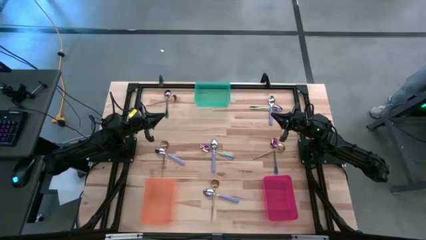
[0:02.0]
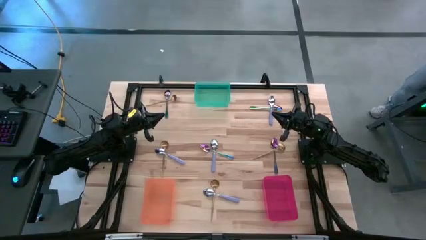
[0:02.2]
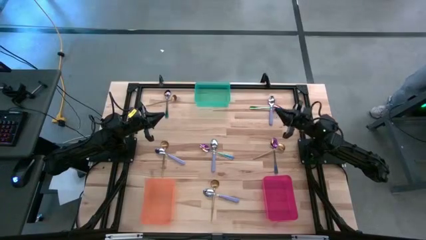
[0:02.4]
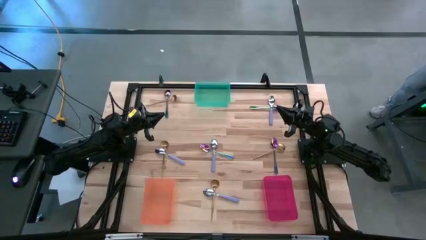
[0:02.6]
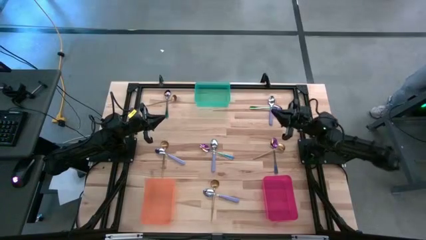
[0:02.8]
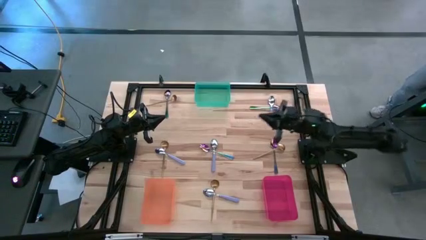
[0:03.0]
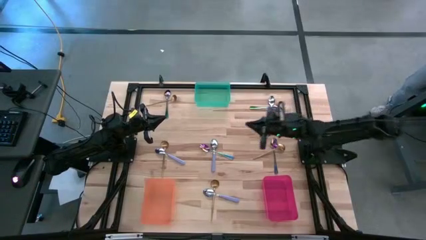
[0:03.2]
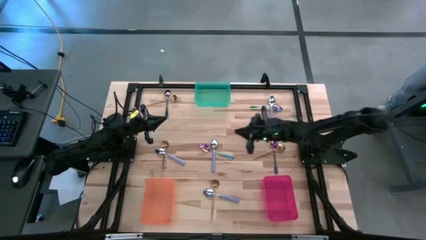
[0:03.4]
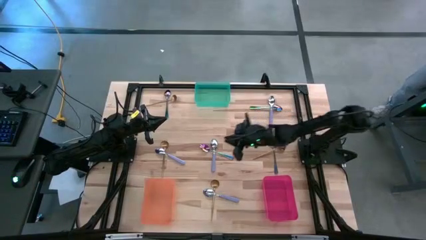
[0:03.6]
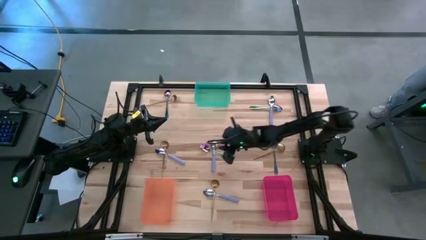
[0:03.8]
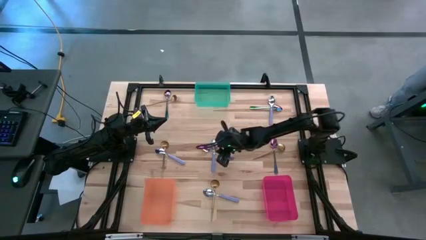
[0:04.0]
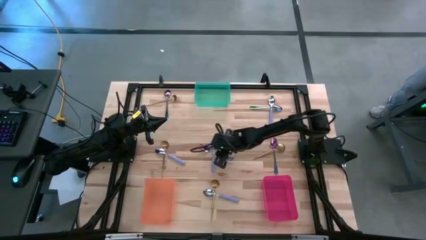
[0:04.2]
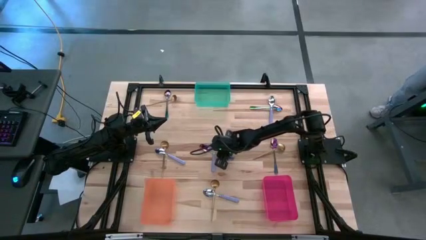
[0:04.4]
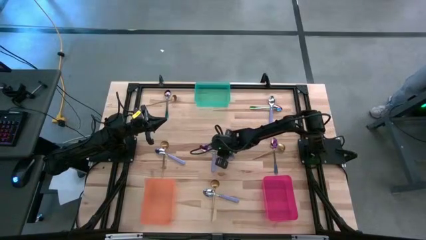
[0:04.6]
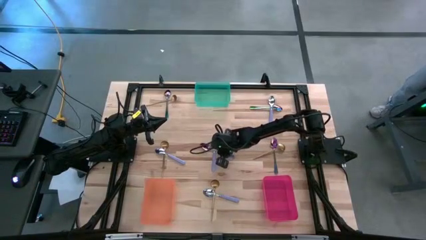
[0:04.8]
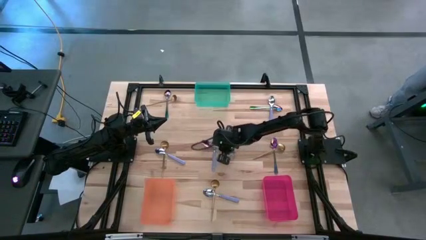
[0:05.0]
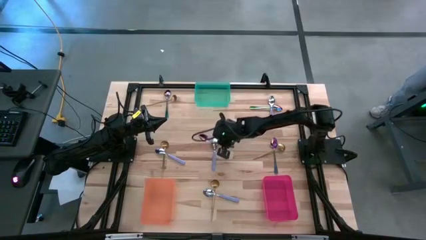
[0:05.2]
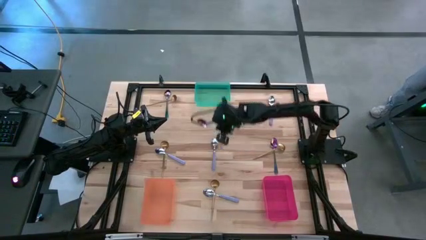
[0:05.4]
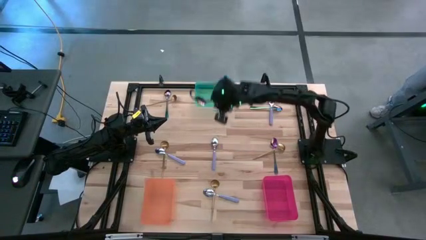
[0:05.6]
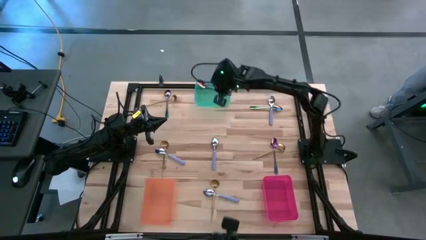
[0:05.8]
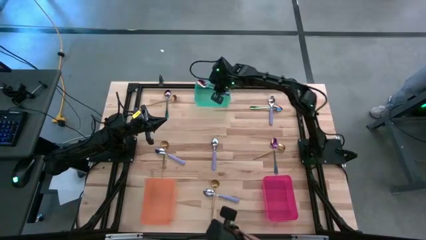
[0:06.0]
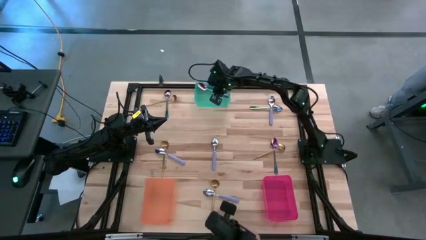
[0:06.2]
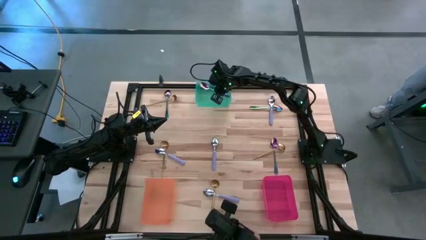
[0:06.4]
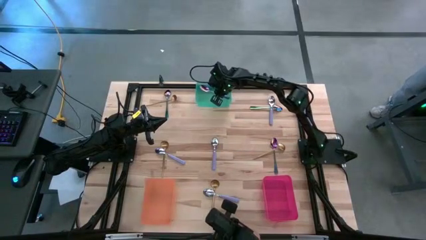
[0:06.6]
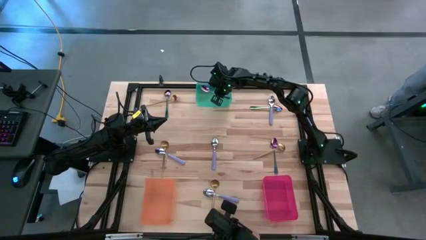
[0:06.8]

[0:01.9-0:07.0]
Task: Sort silverware by color (type)
Put the blue spoon into the green bin

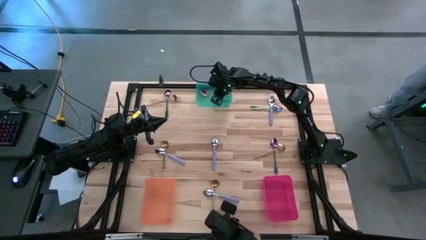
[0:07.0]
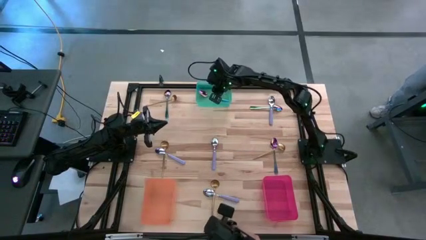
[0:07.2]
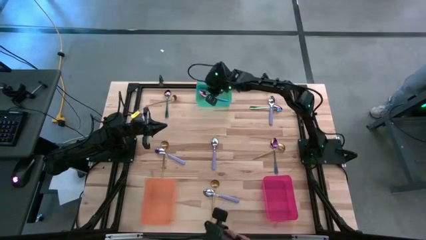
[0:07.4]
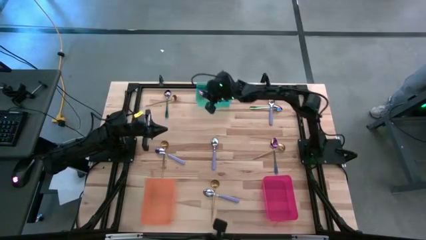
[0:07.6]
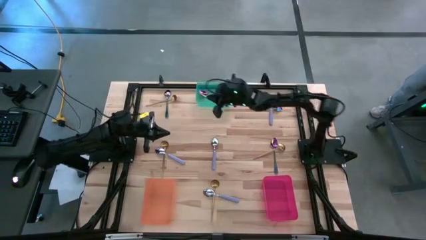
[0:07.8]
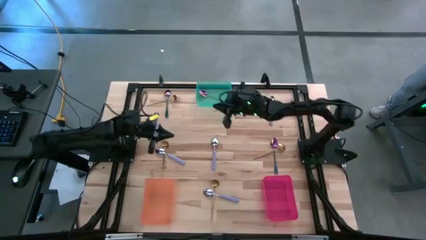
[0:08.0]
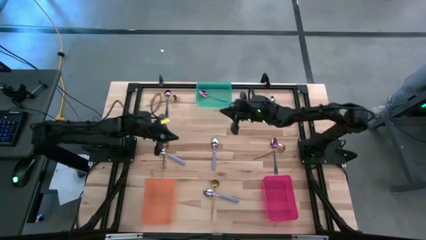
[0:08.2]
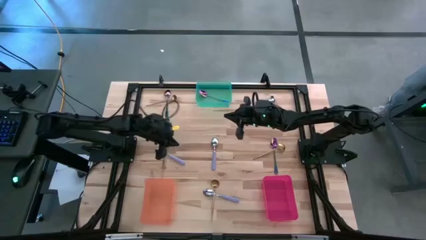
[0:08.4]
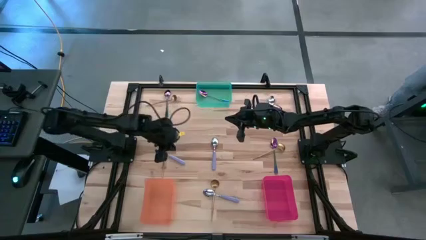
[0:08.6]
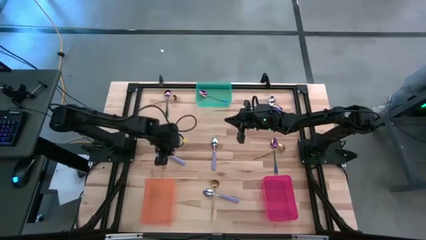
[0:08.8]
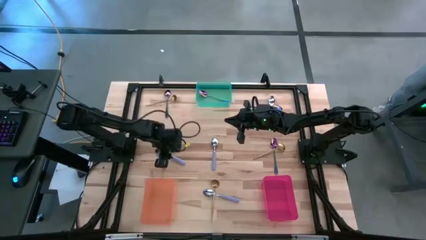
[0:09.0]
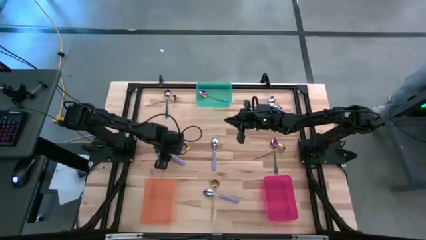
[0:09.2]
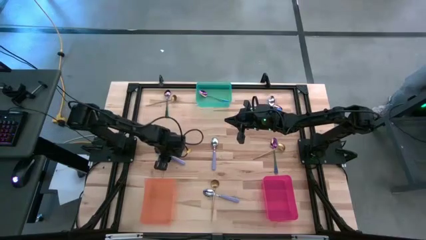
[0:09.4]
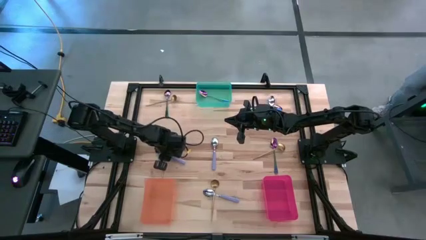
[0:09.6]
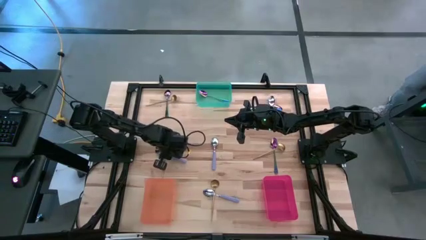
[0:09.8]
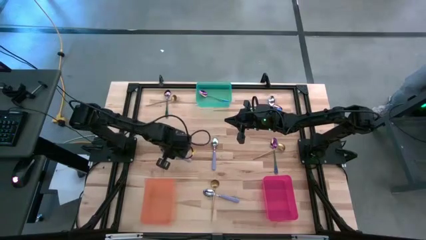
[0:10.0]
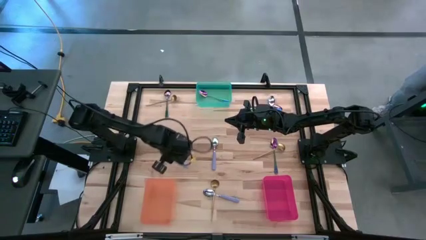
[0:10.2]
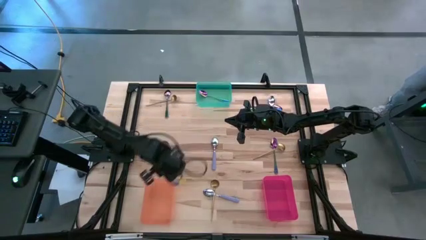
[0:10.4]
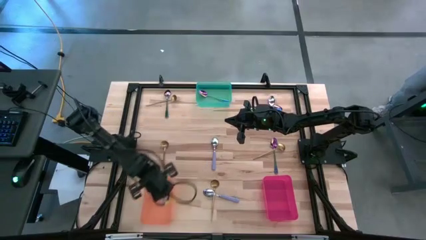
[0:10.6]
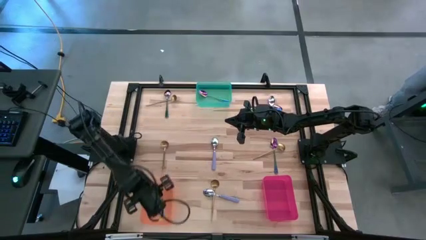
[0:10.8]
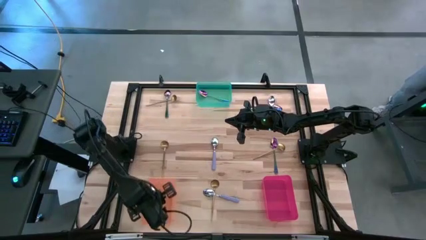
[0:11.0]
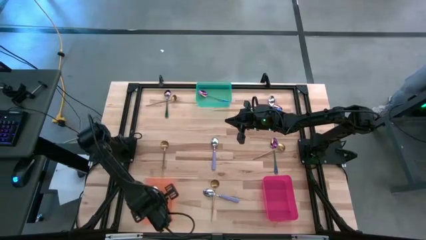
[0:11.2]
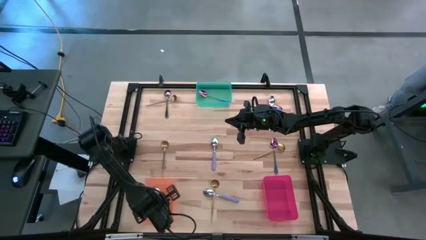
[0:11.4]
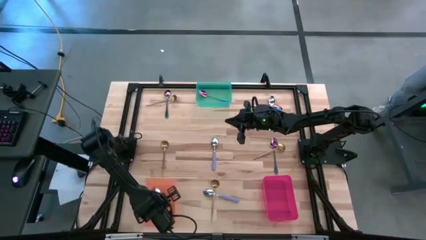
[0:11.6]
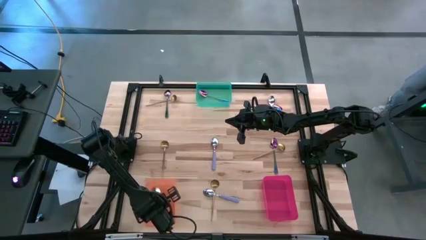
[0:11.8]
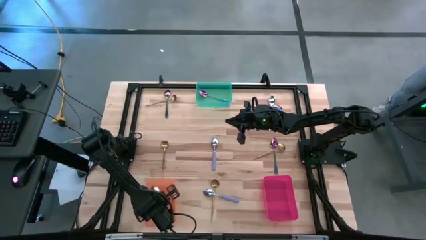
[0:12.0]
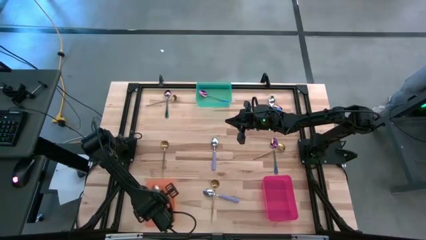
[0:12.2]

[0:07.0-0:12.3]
Put the purple spoon into the orange bin

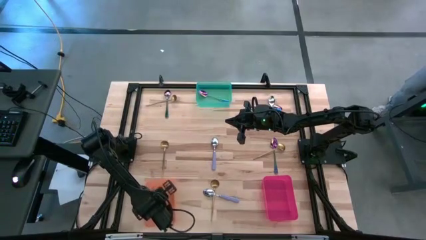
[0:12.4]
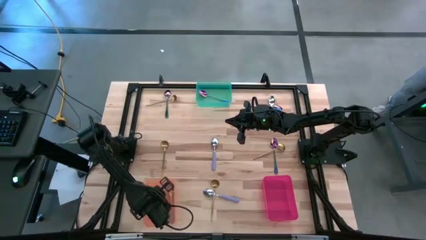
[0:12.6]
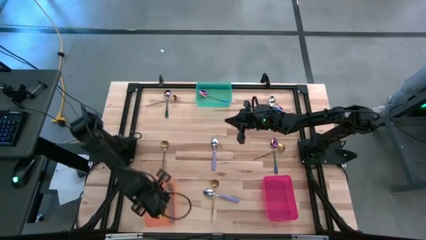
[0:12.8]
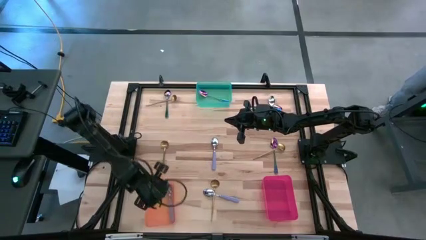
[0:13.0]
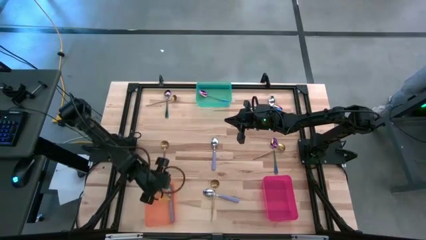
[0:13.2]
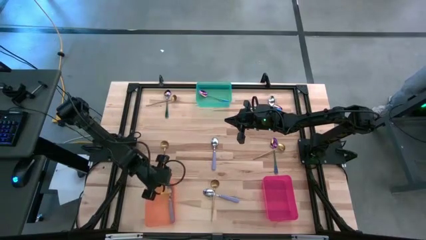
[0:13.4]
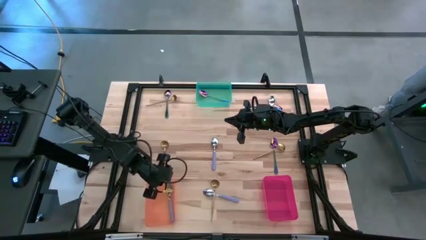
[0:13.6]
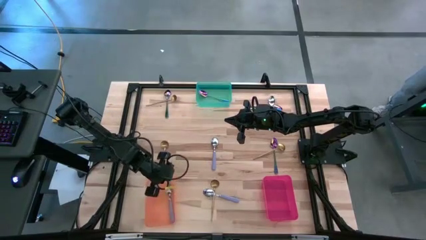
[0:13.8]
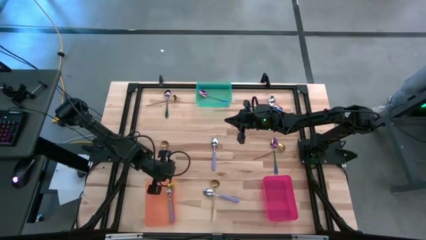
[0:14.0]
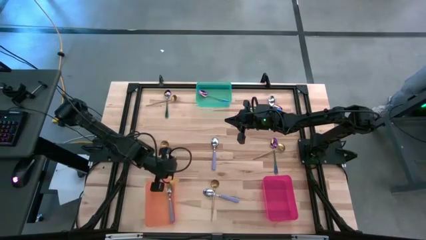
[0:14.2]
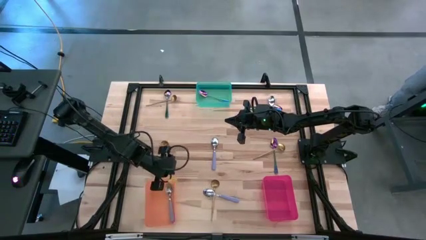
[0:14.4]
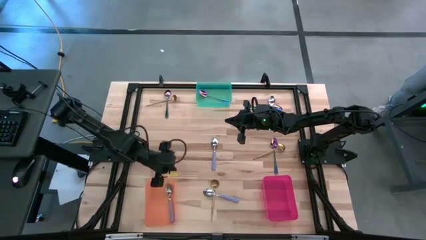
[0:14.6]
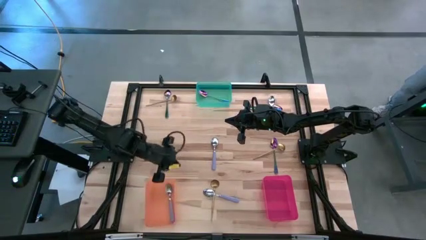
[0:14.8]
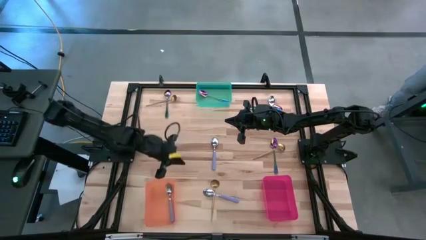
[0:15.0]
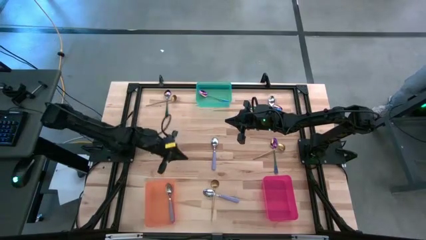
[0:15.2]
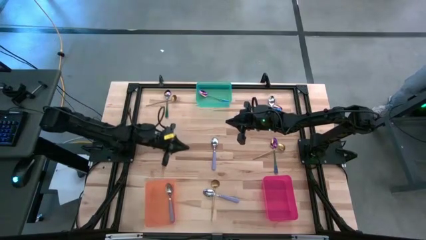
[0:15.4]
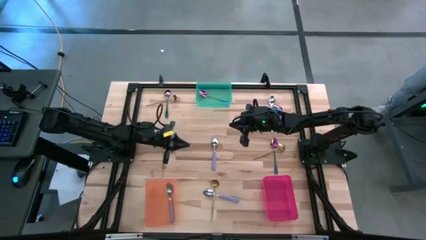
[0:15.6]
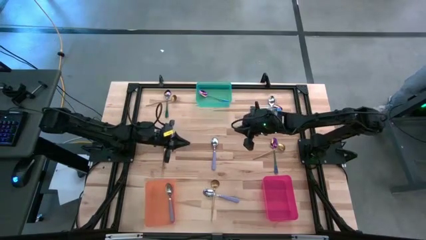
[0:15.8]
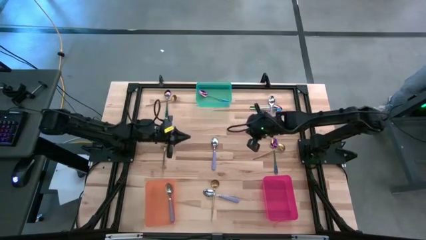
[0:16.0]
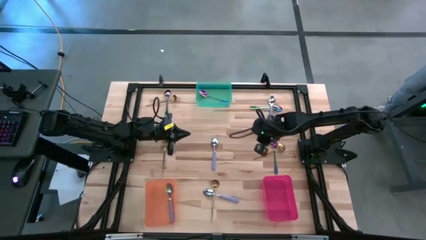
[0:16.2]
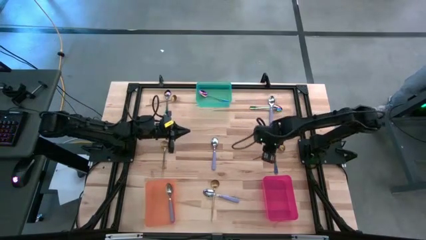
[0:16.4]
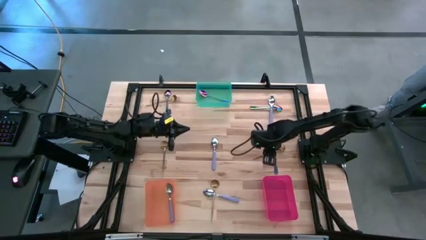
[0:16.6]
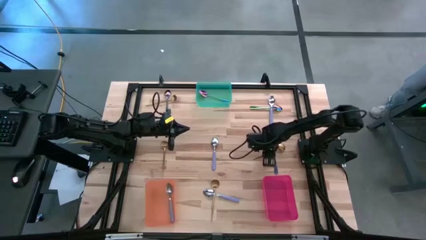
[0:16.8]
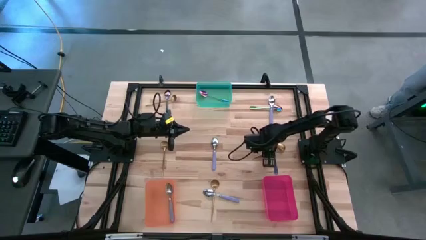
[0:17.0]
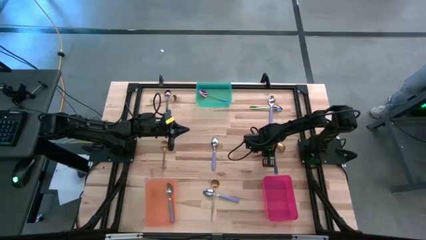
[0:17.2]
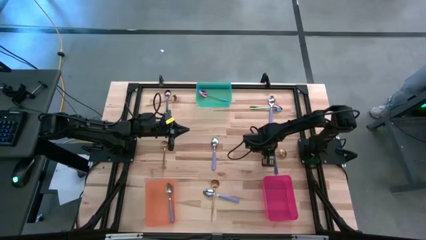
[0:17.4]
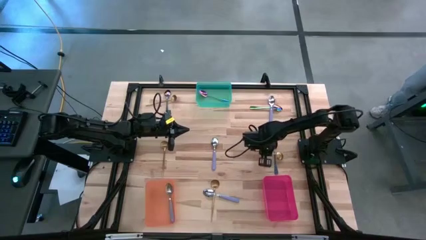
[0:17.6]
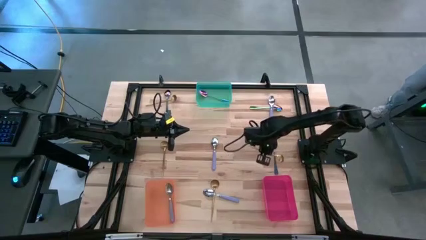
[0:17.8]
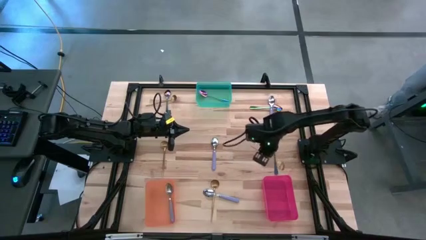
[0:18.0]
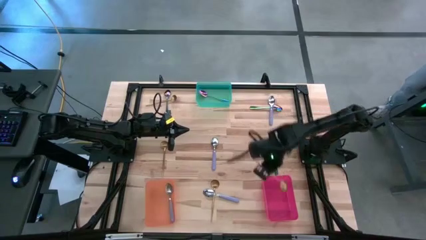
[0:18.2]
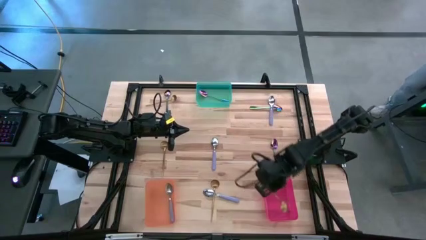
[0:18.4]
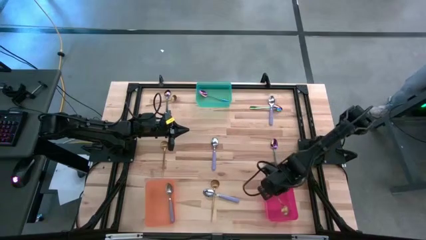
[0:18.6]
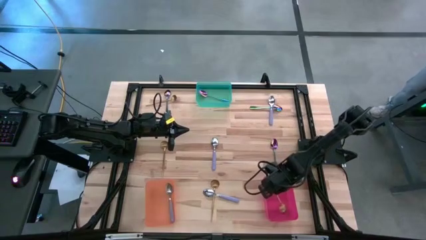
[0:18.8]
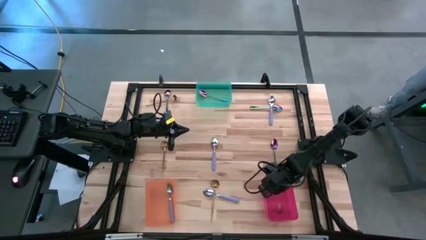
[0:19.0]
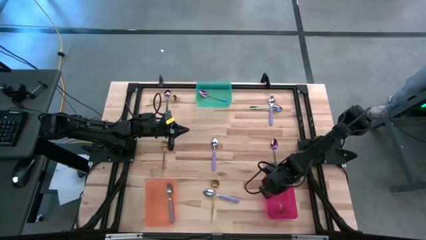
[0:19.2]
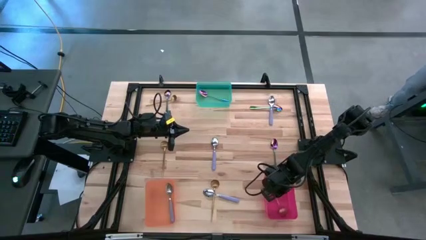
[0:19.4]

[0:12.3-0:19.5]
Put the yellow spoon into the red bin
